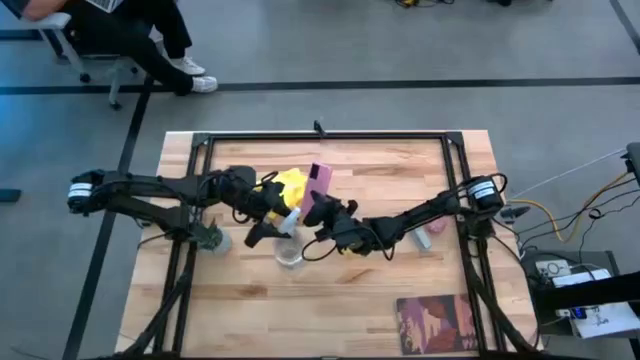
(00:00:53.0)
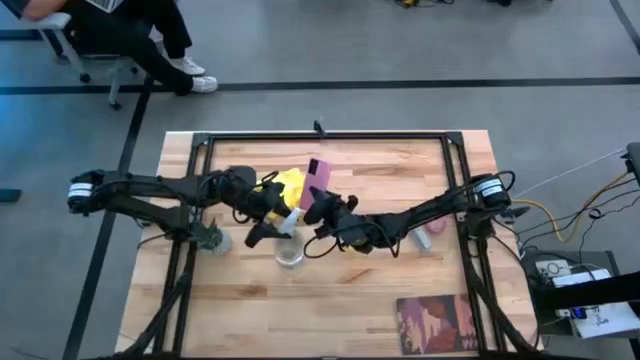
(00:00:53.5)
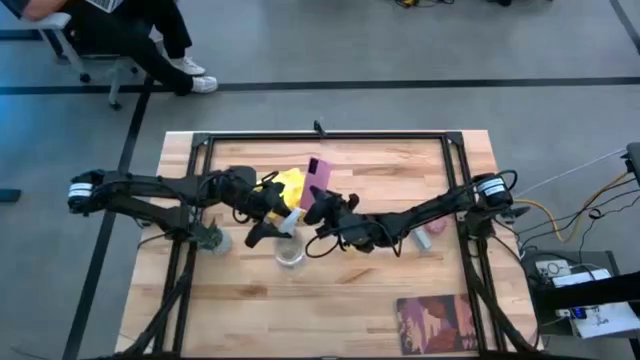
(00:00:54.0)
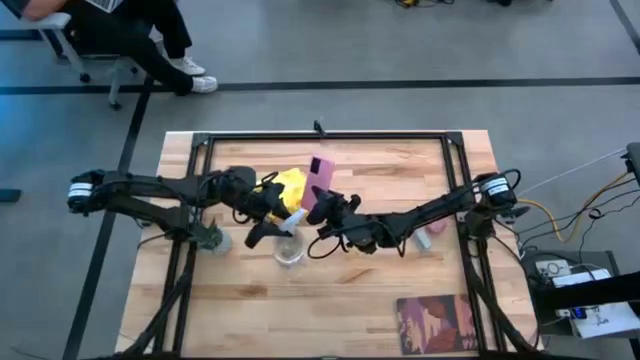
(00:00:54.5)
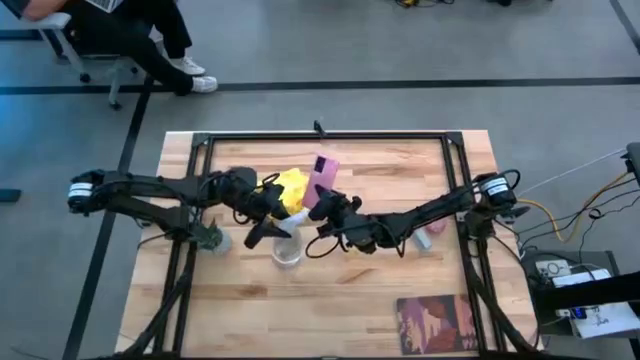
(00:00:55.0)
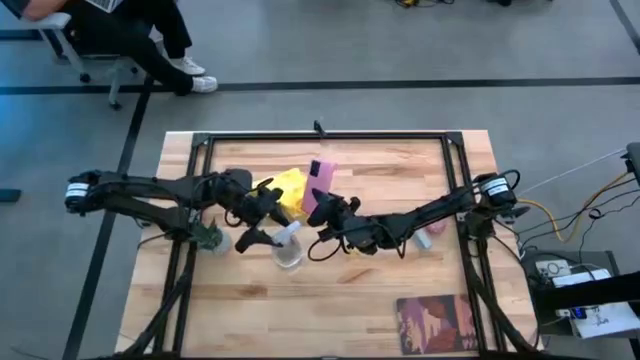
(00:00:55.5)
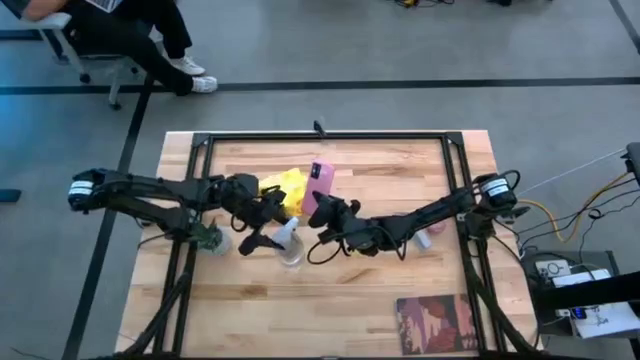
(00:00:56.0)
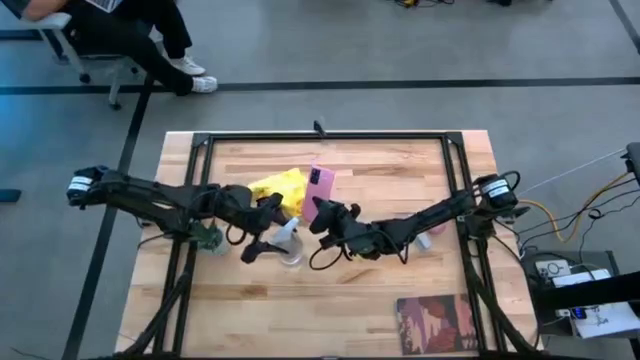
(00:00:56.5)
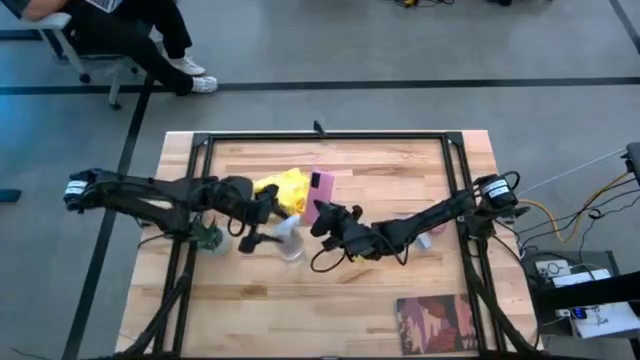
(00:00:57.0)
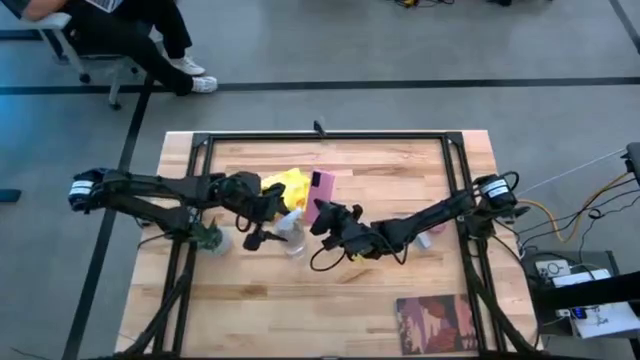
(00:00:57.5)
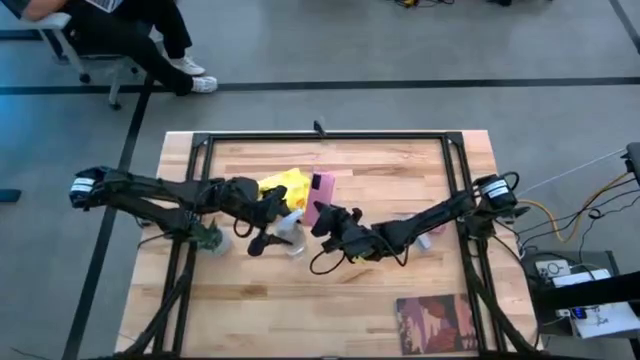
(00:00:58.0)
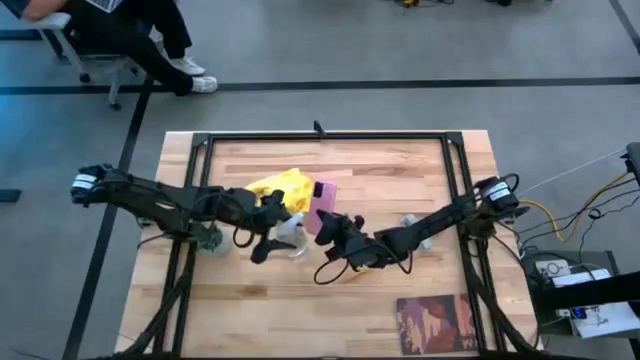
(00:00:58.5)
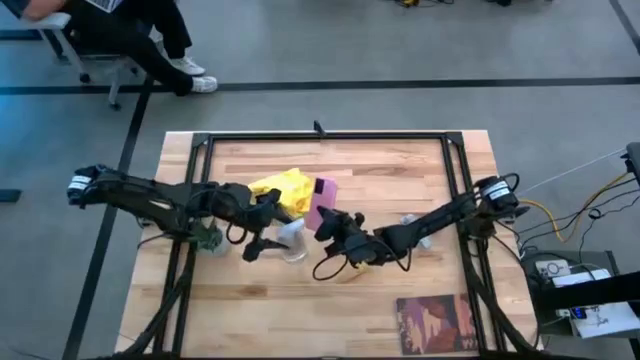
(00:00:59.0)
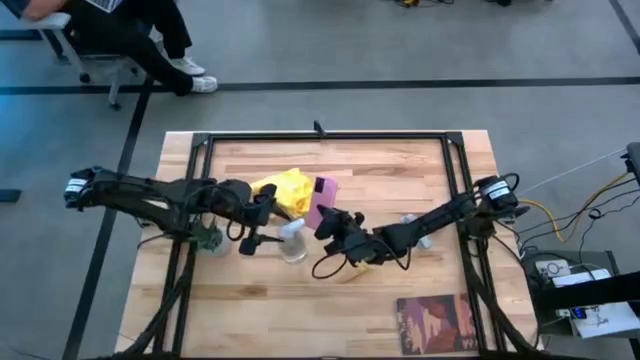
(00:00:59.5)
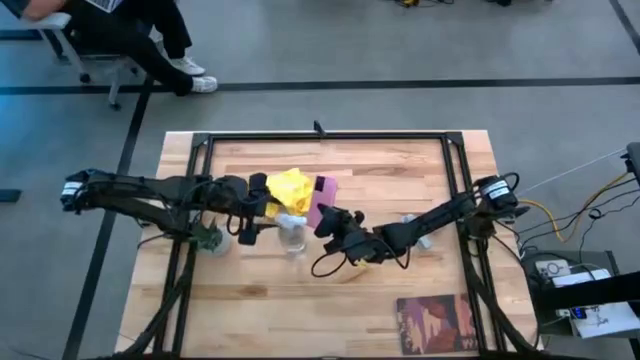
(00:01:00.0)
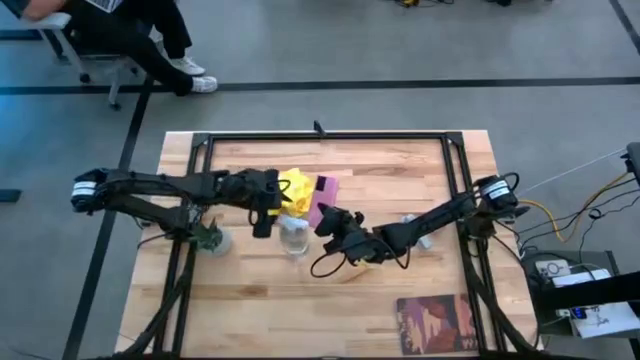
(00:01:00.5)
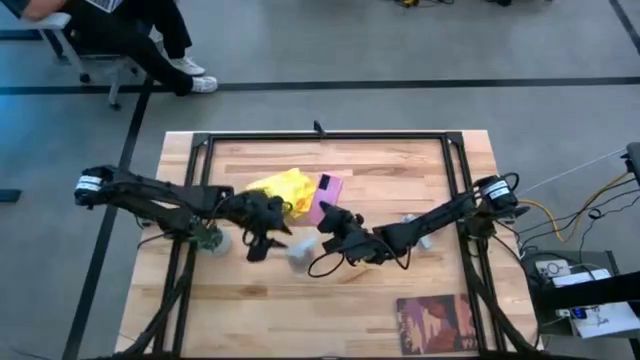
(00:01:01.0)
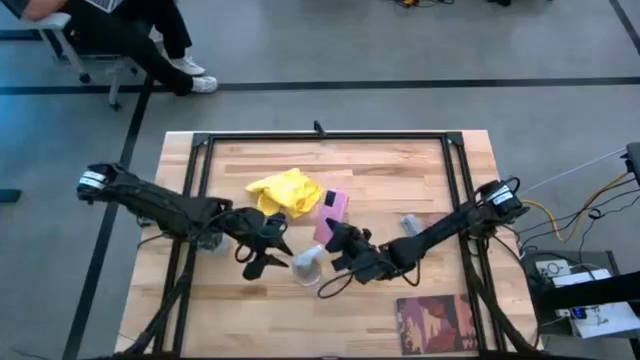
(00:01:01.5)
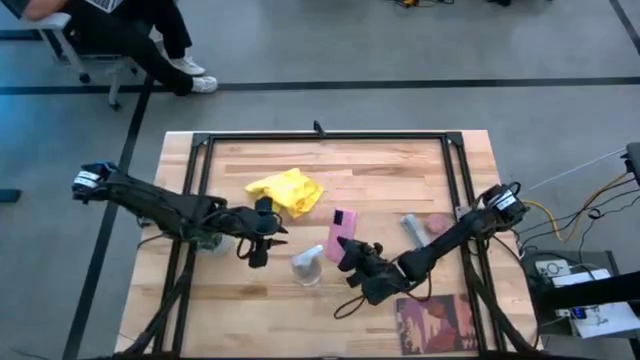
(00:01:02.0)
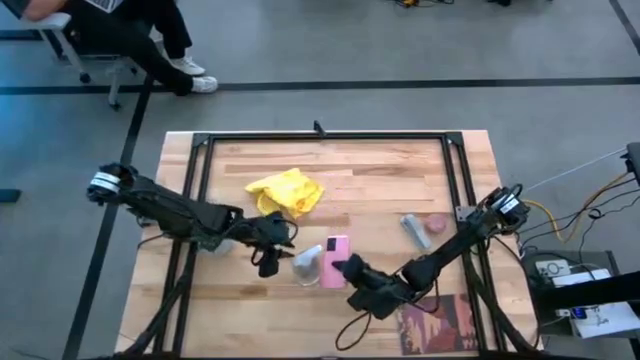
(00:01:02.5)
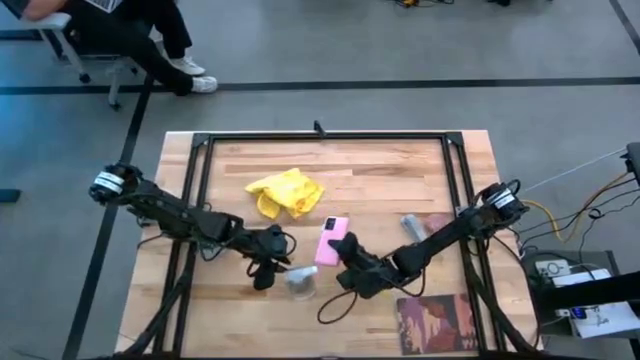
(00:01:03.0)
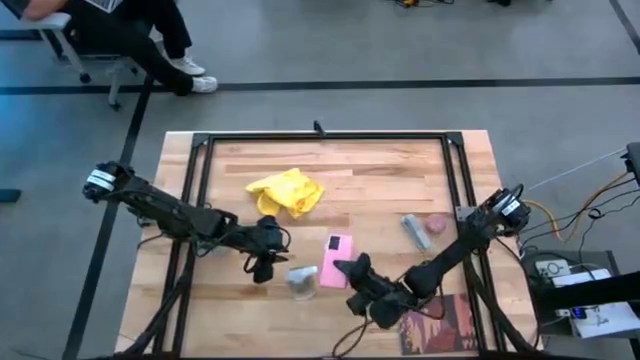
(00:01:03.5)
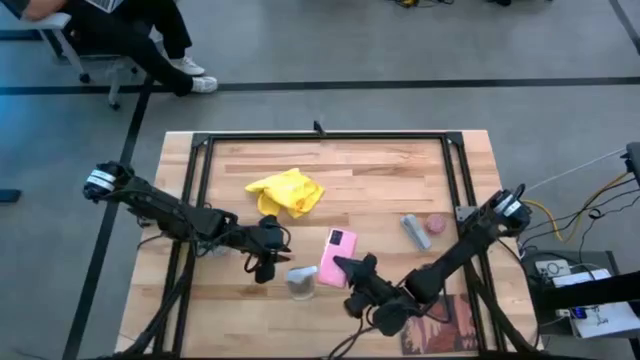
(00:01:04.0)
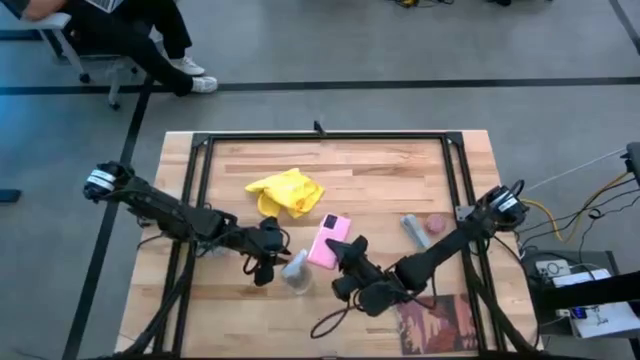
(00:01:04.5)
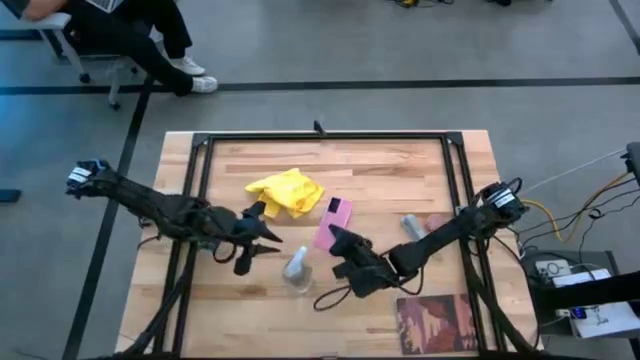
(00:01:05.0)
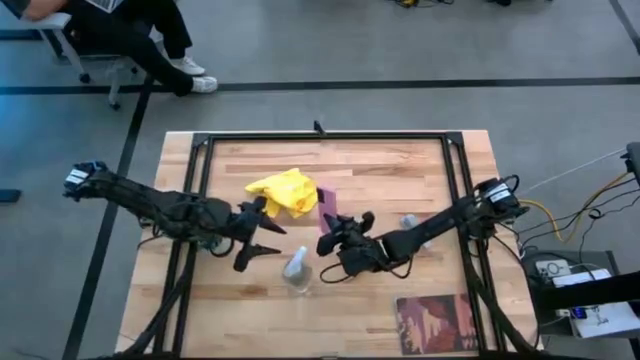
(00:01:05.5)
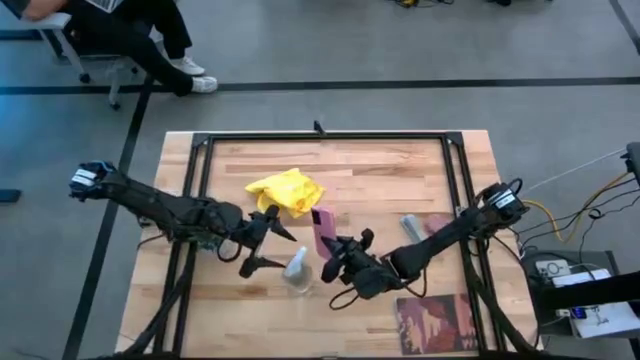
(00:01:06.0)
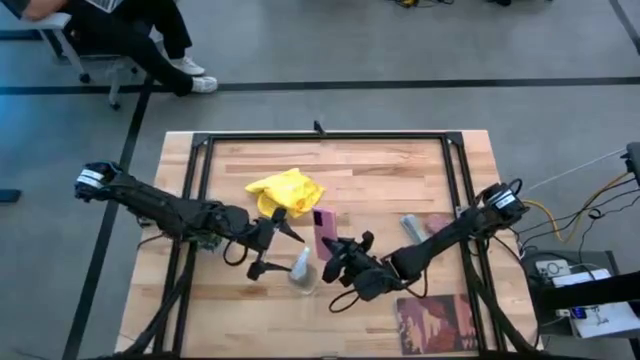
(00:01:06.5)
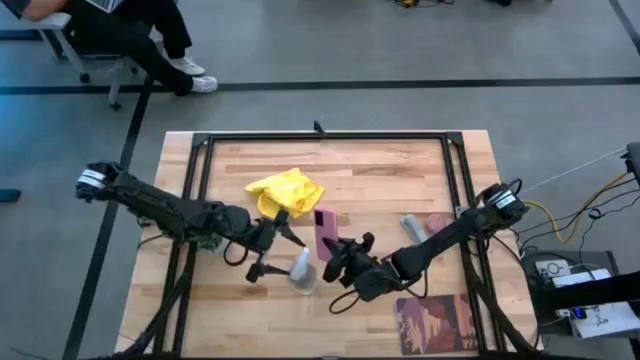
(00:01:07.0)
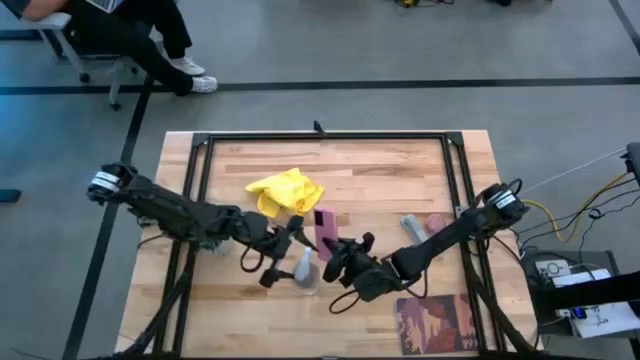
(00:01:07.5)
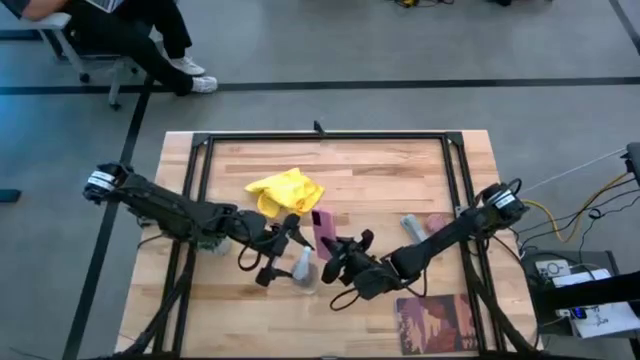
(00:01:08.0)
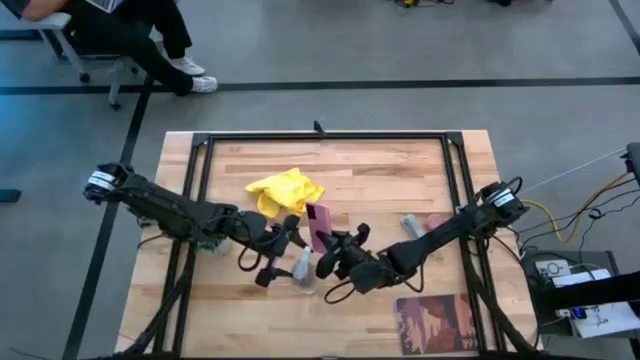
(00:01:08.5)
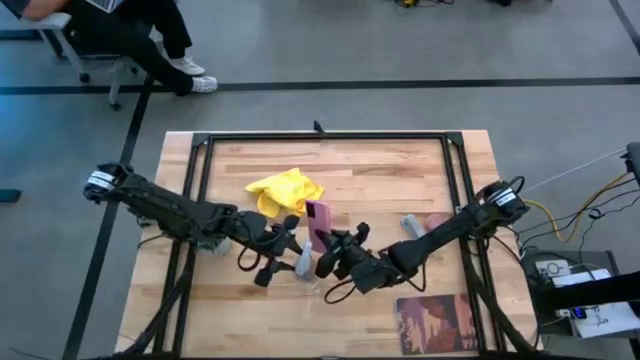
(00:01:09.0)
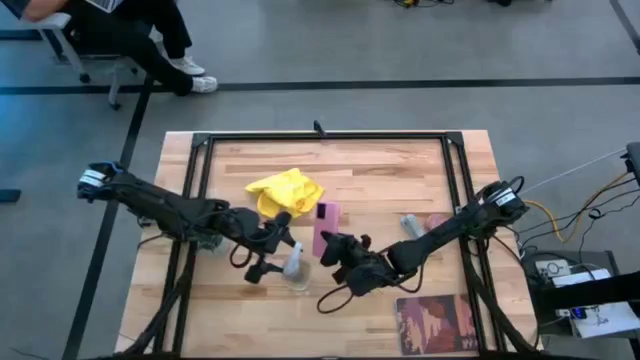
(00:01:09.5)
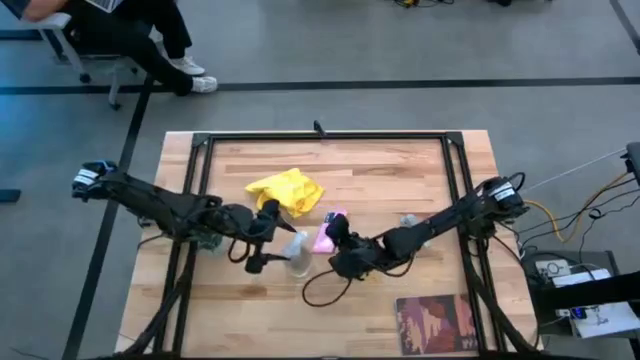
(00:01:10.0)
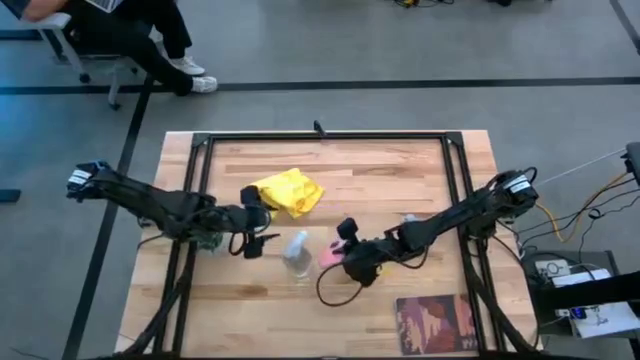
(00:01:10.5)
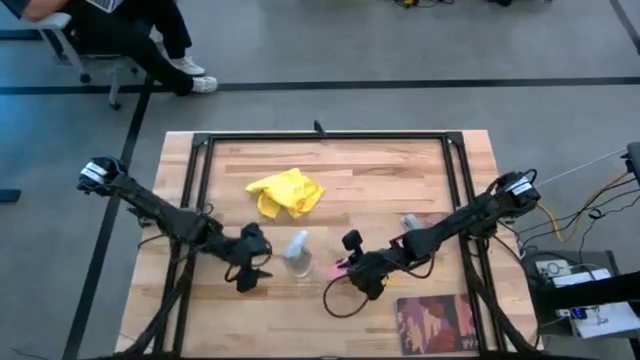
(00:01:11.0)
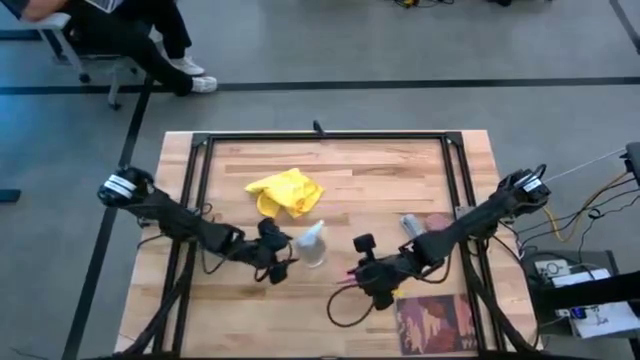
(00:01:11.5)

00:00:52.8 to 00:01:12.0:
Task: Apply microfiber cloth
Spray the front and back of the cellphone using the spray bottle
